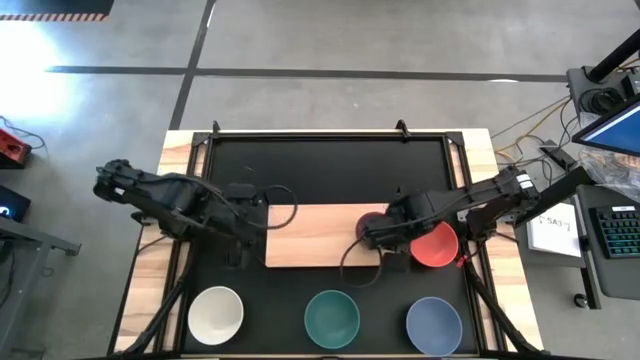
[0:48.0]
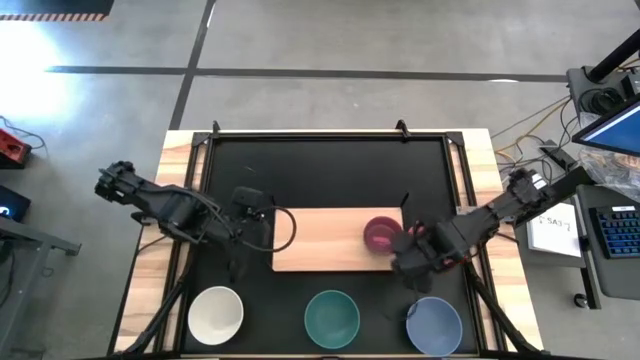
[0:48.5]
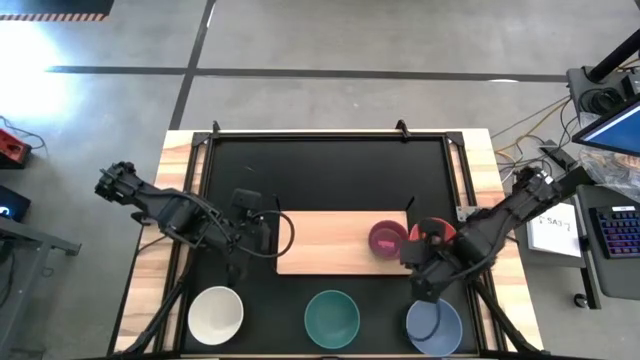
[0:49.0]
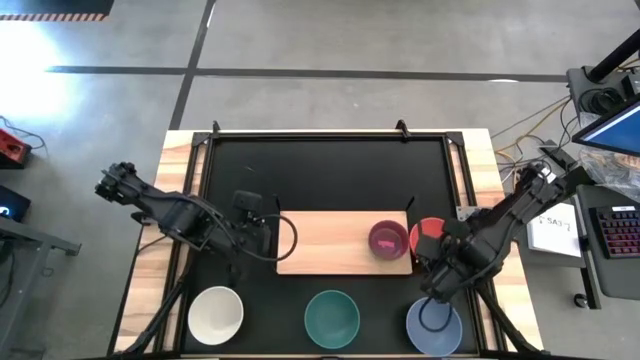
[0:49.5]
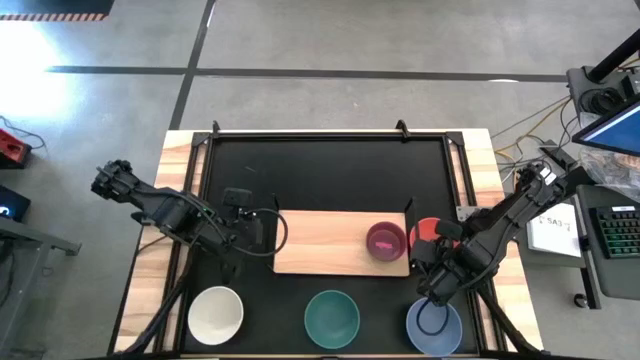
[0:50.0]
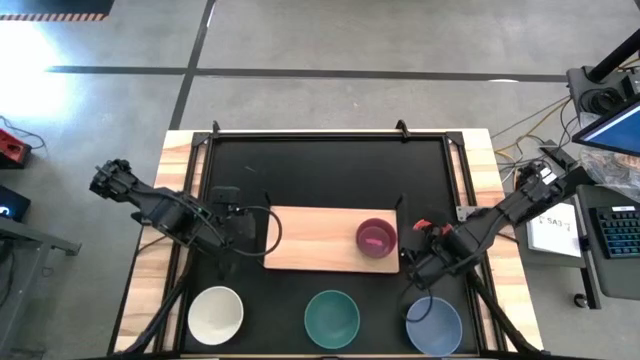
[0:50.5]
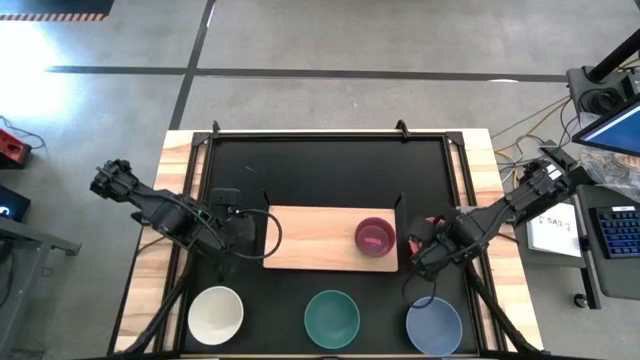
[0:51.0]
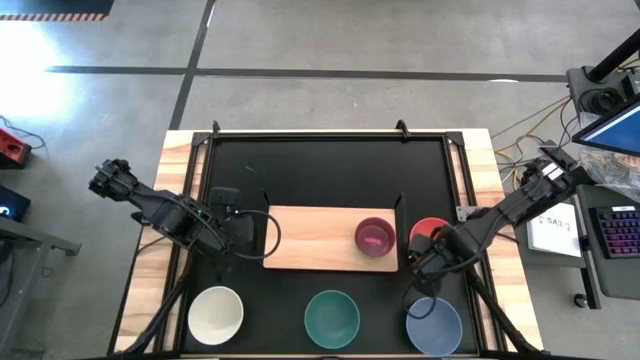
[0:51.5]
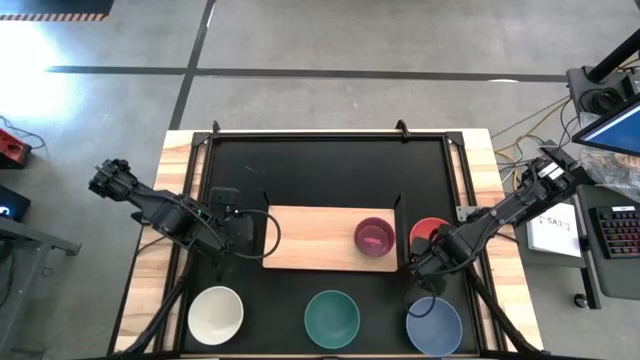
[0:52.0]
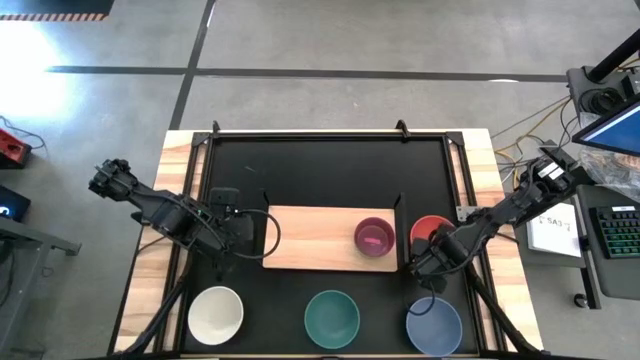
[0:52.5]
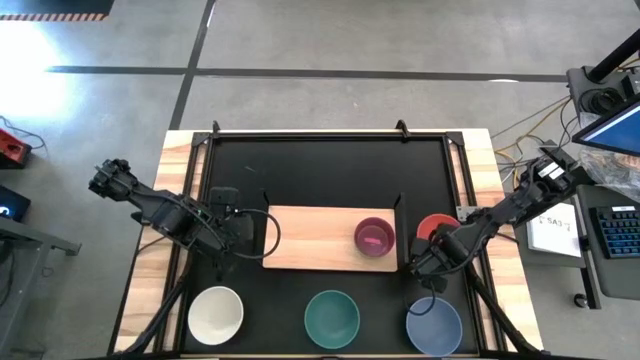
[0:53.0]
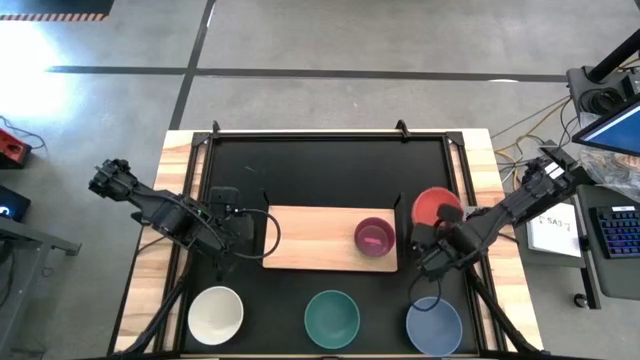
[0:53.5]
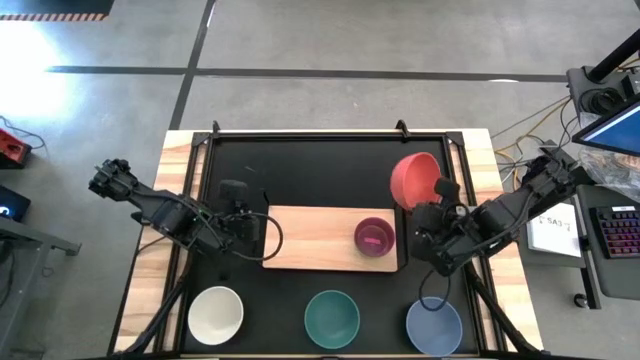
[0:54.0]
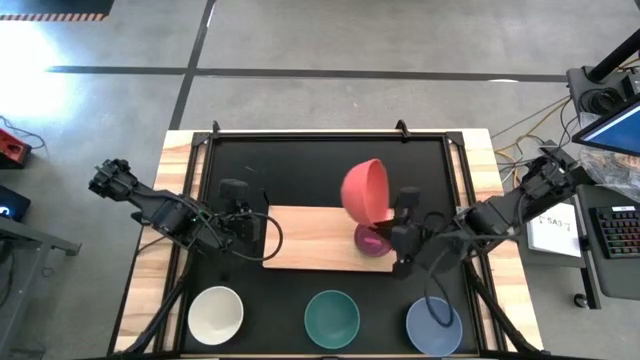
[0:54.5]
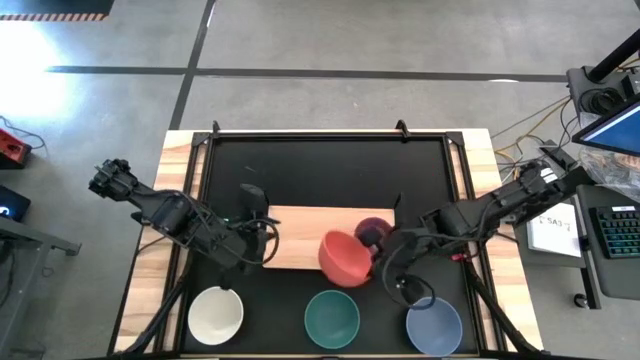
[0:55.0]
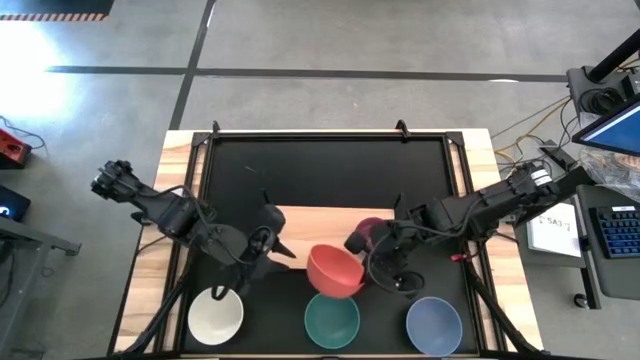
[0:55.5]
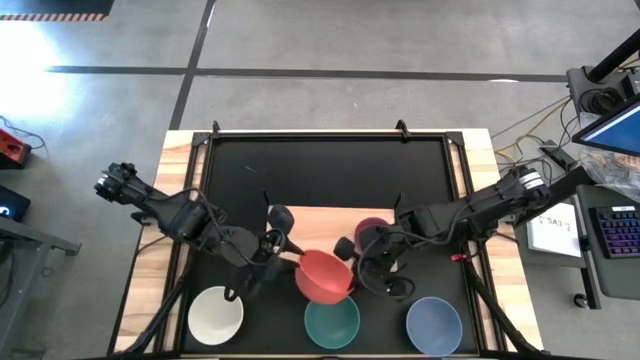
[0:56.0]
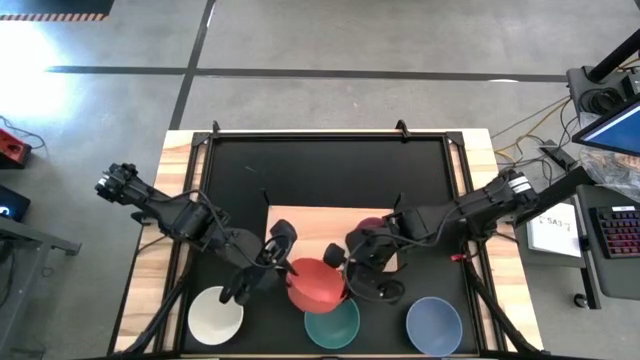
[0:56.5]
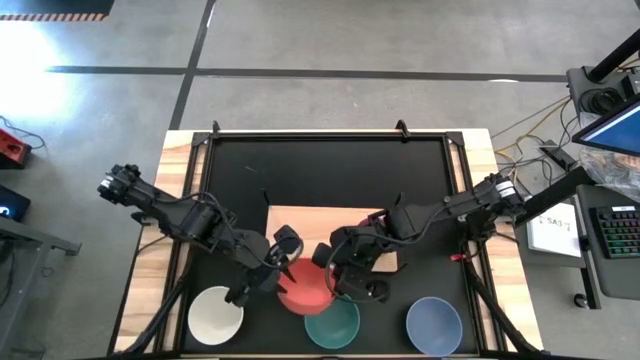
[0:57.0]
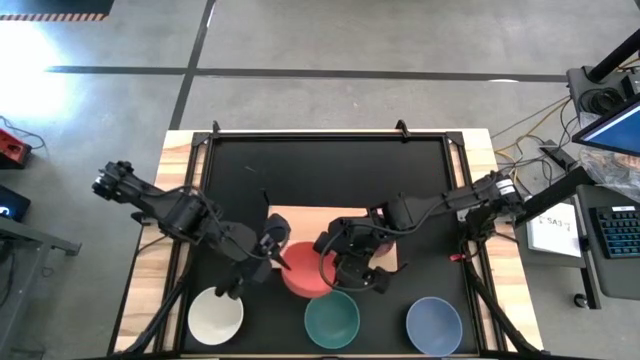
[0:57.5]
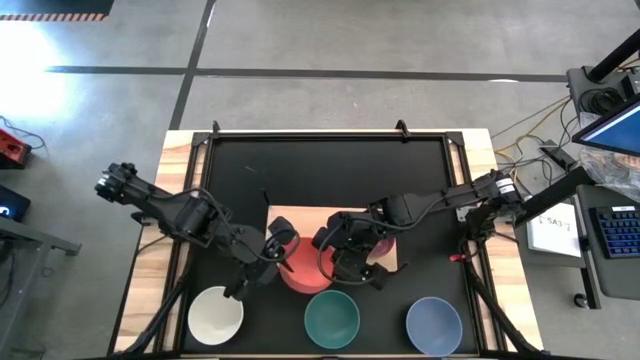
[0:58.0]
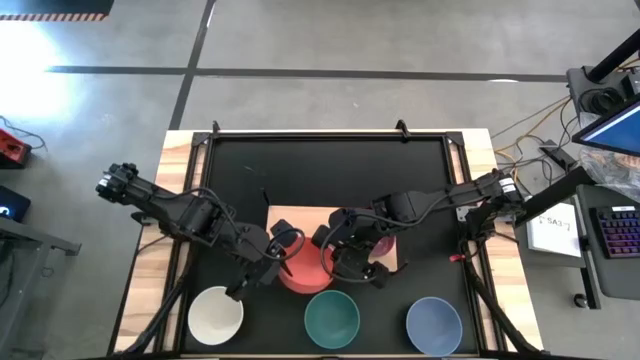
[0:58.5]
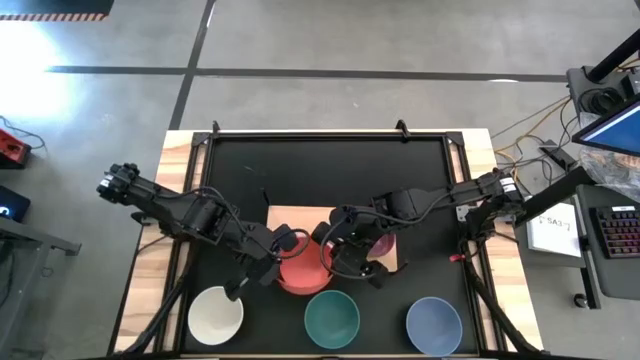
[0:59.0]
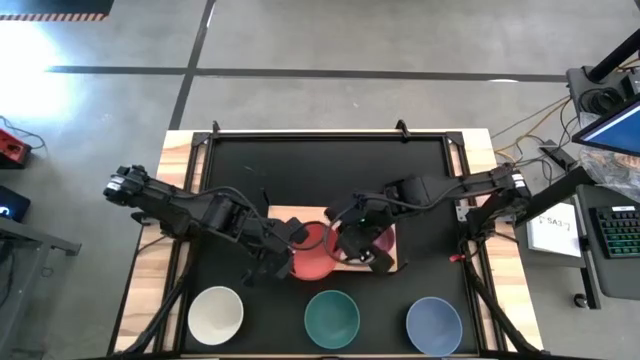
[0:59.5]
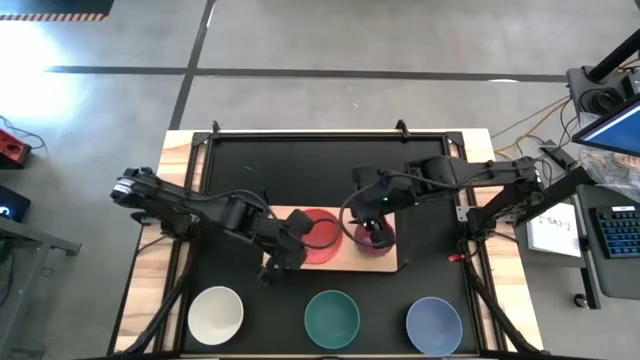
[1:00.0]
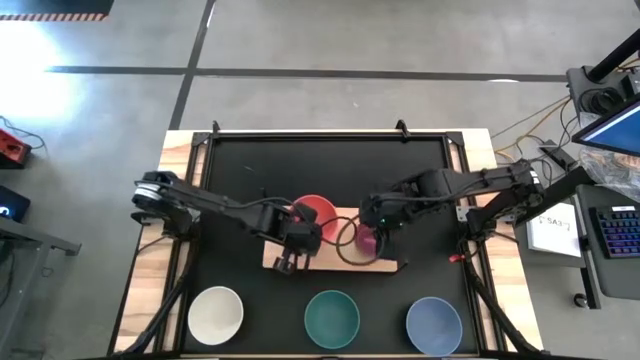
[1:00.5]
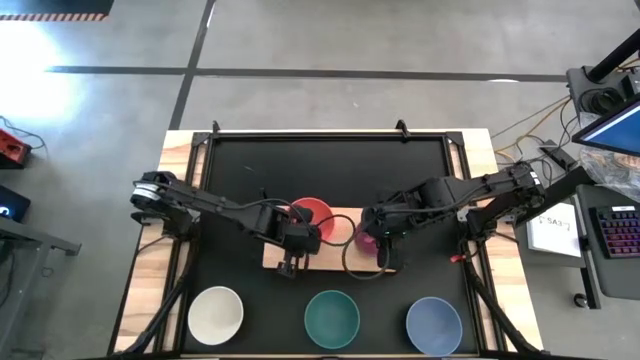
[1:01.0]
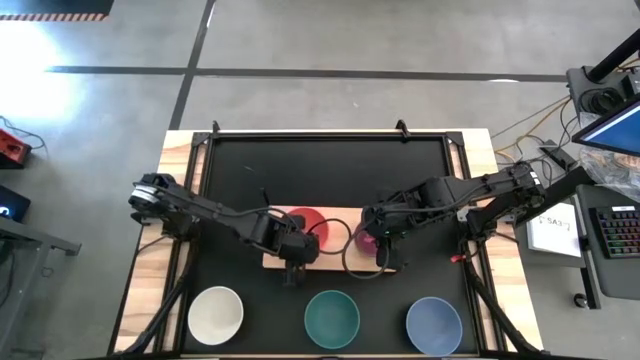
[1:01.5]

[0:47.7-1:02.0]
Task: Place and stack bowls onto a shelf
Put the orange bowl on the shelf

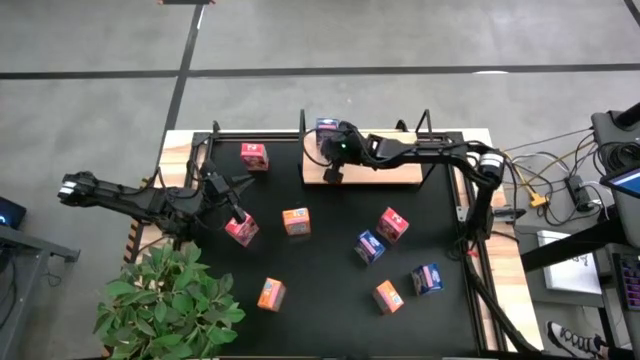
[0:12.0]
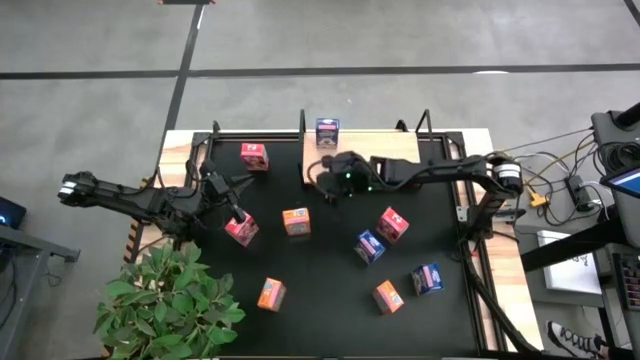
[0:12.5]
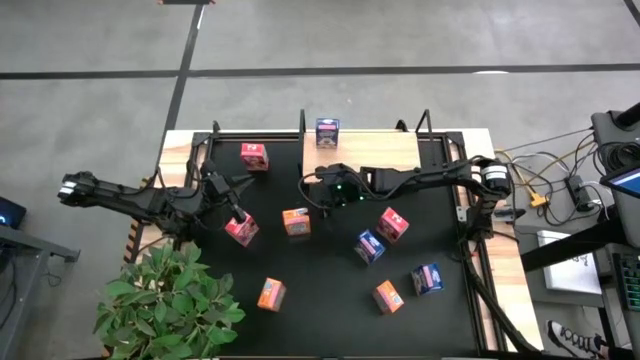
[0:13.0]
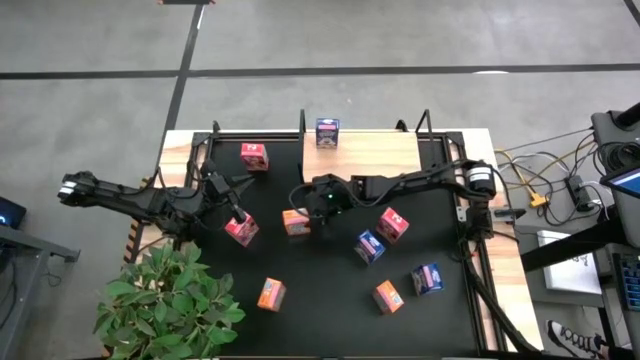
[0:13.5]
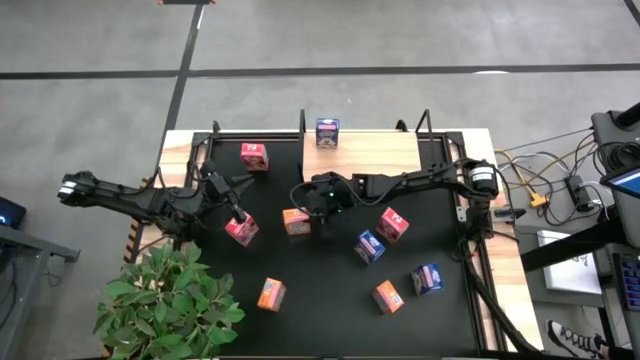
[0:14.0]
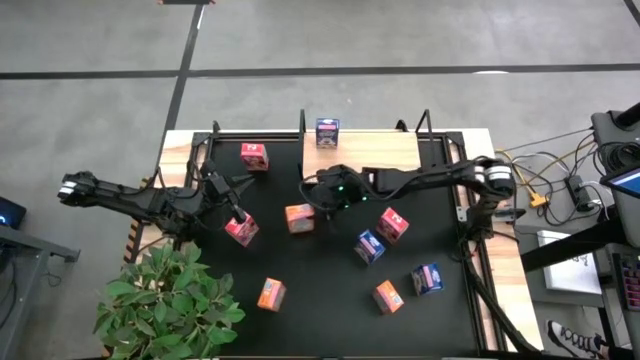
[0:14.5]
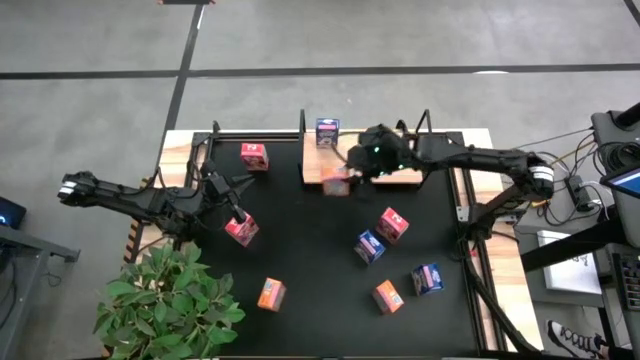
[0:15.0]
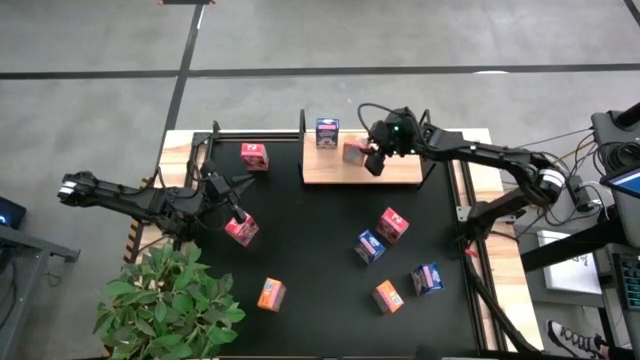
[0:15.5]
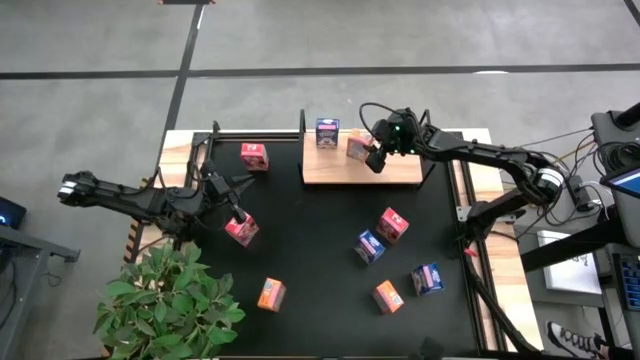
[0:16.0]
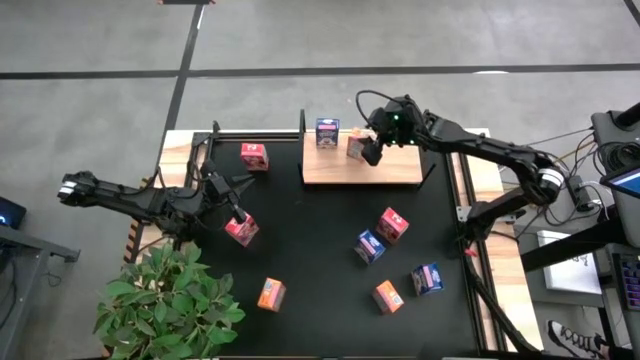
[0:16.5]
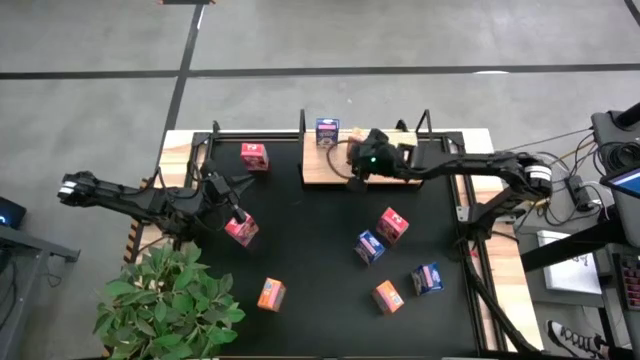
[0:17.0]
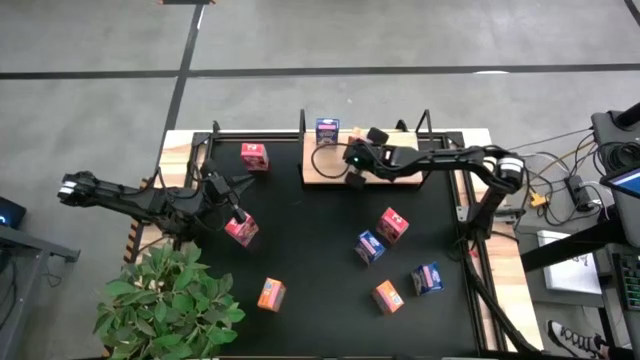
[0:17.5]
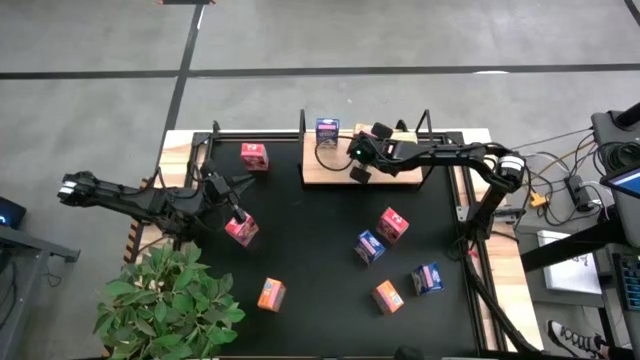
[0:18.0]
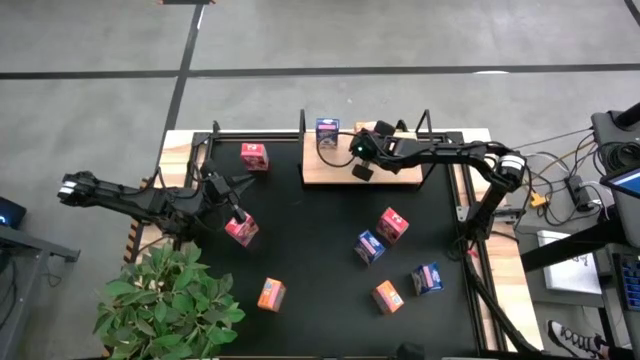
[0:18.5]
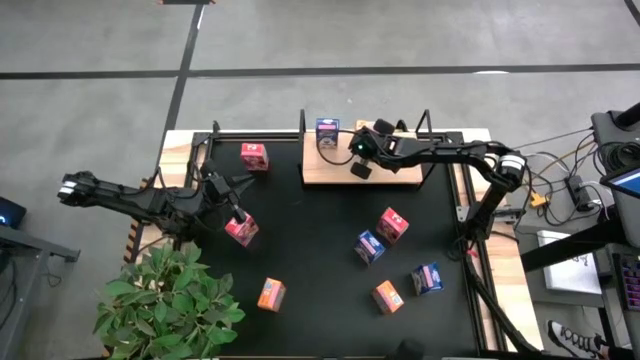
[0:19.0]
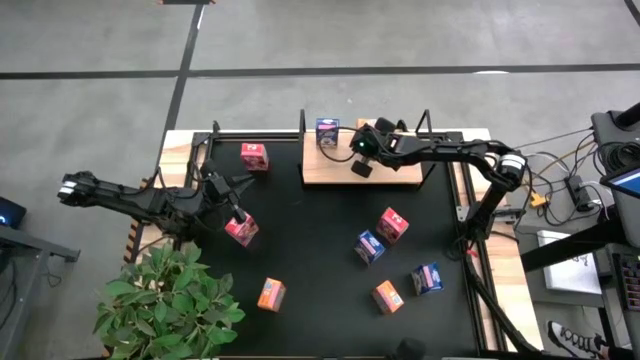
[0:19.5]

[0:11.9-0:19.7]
Task: Stack cereal on shelf
Put the top left orange cereal box on the shelf
